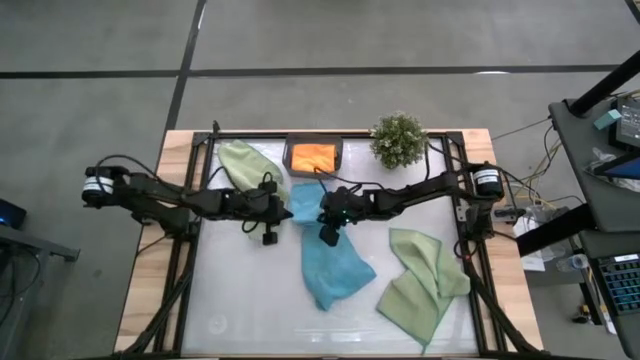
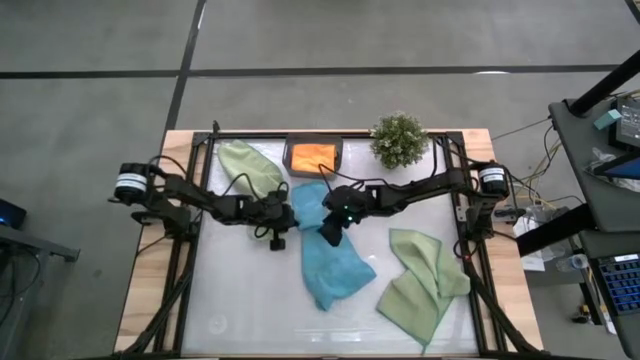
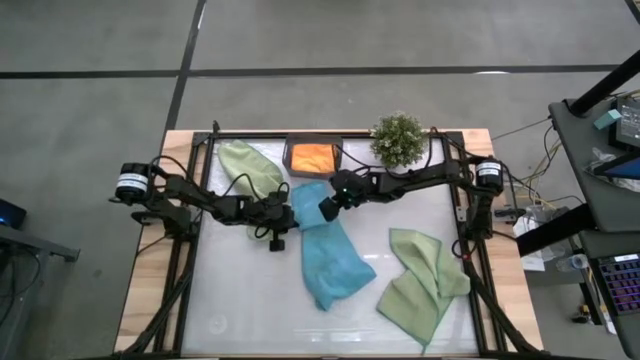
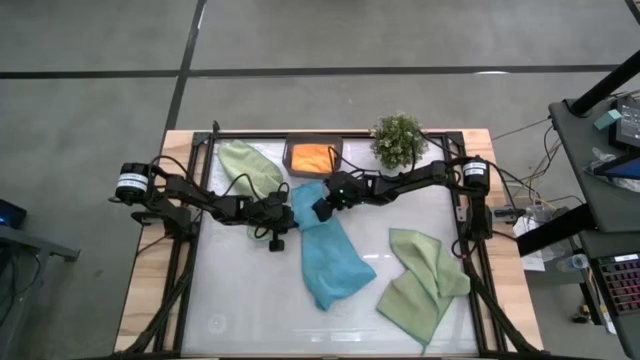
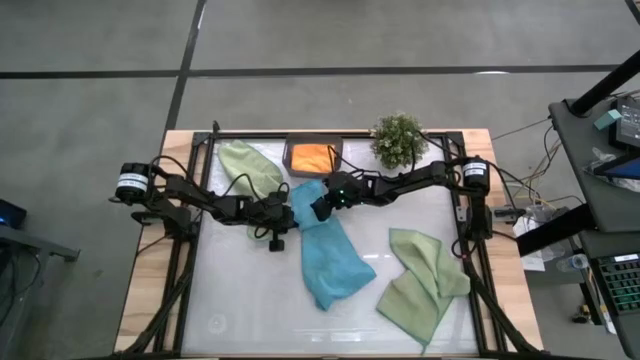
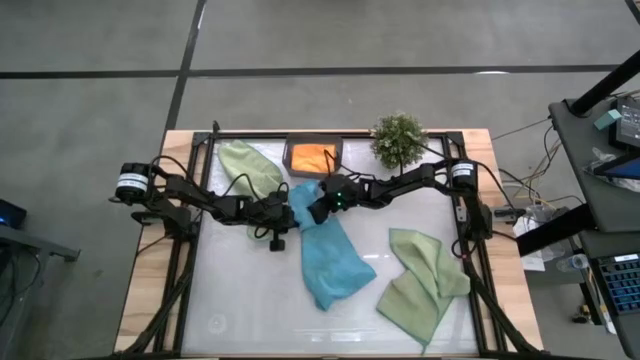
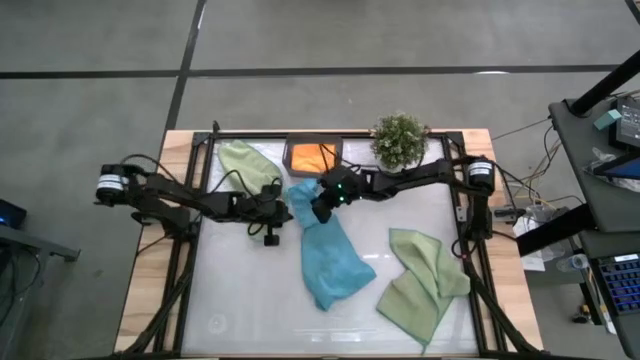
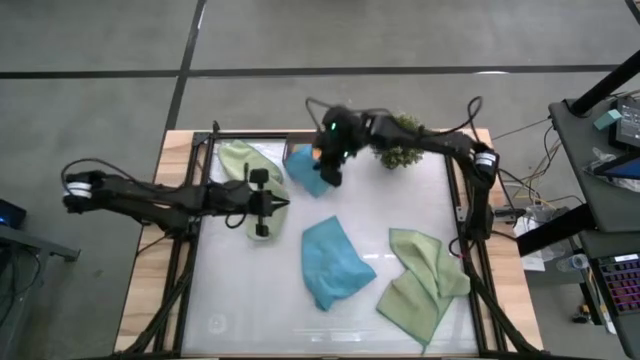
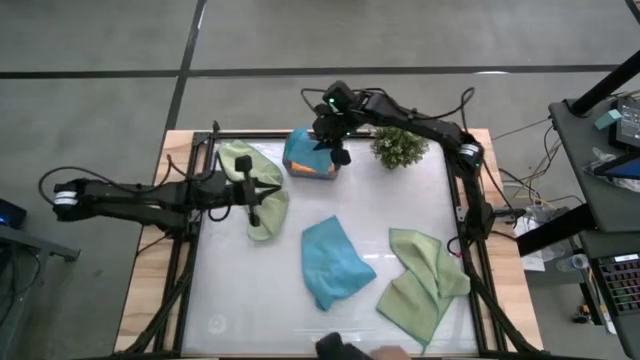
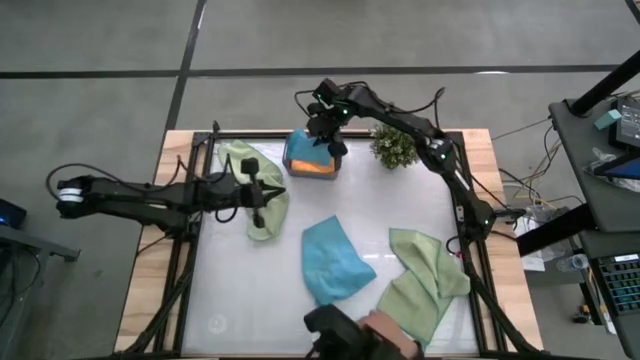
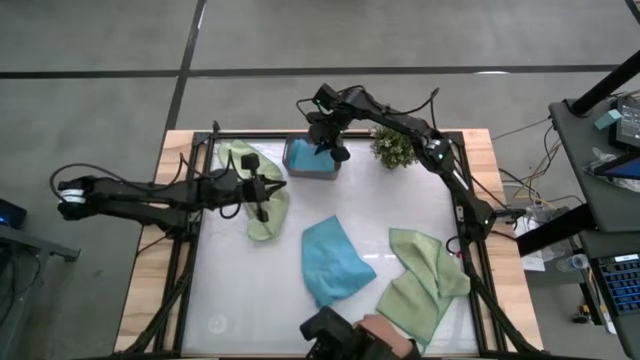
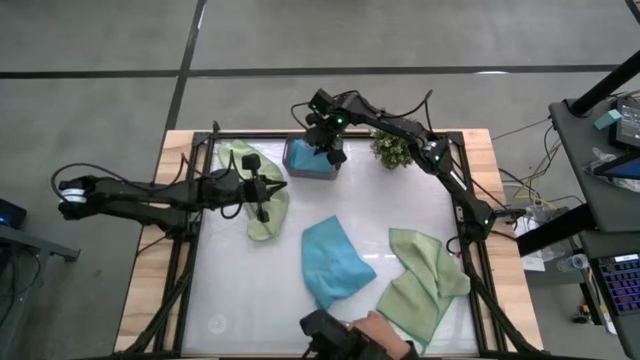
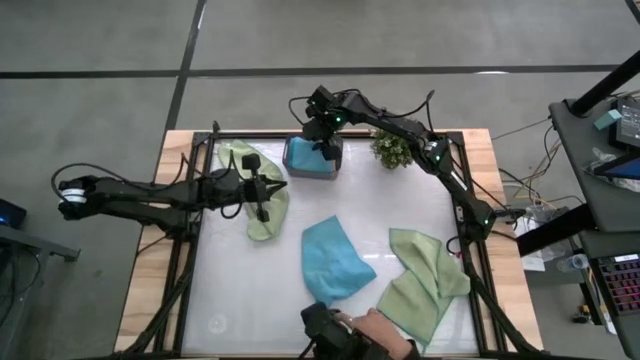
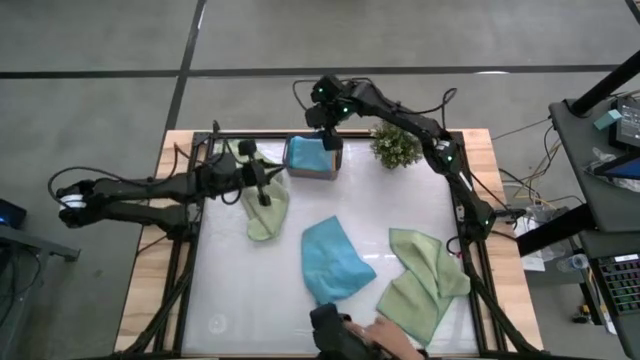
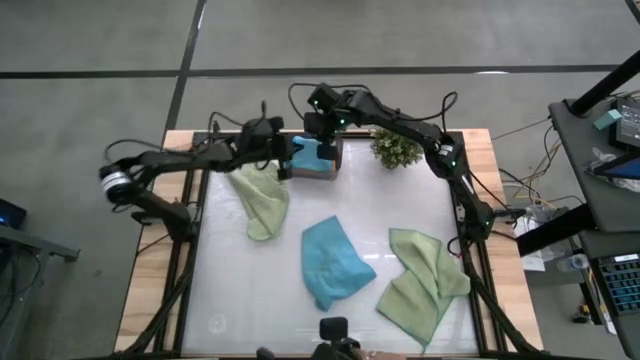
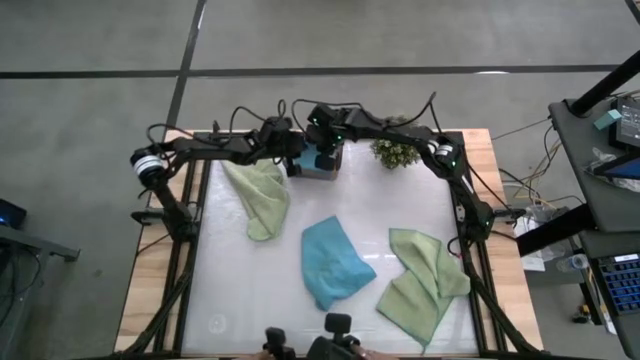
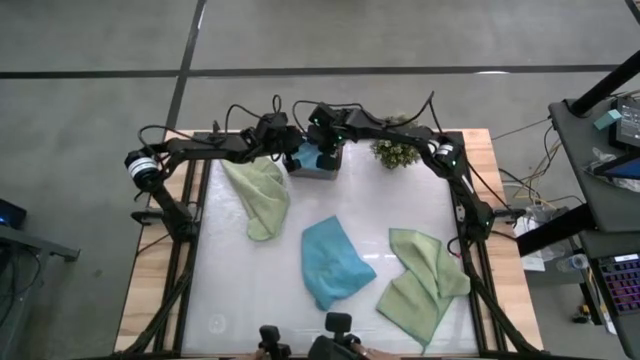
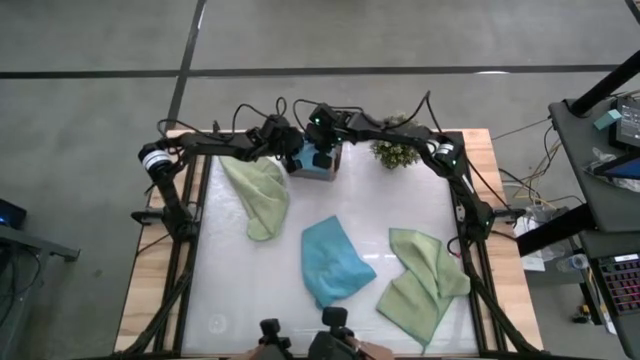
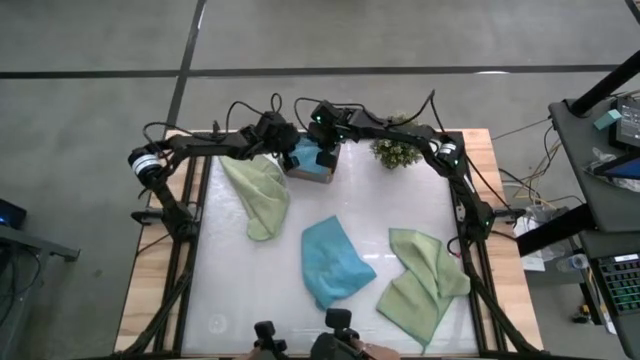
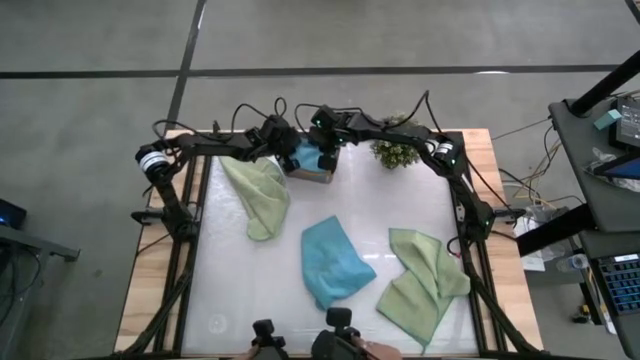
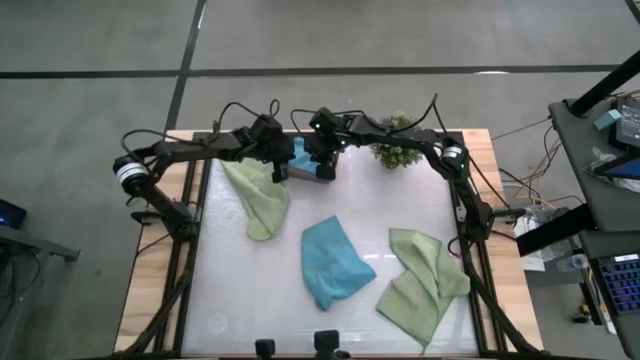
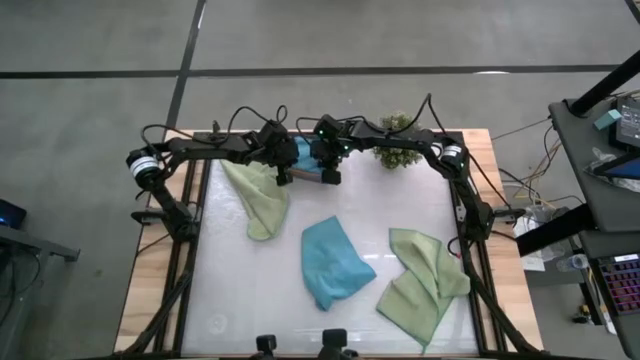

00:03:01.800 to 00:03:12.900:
Task: Fold microfiber towels
Put the folded blue microfiber towel into the black bin

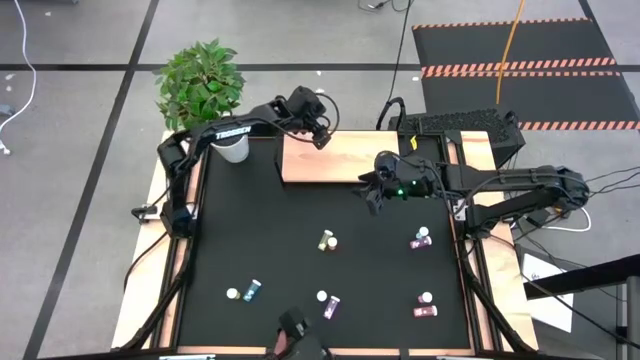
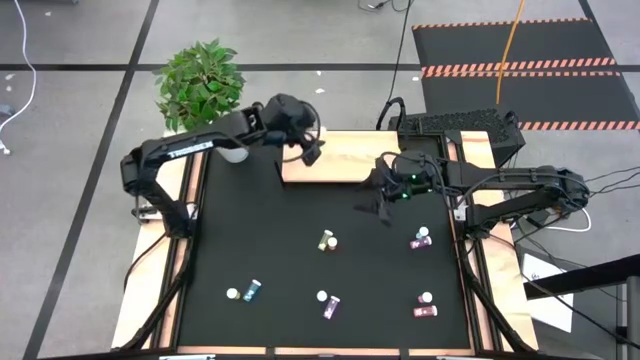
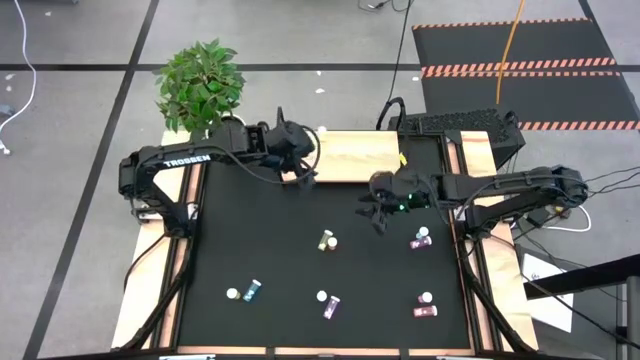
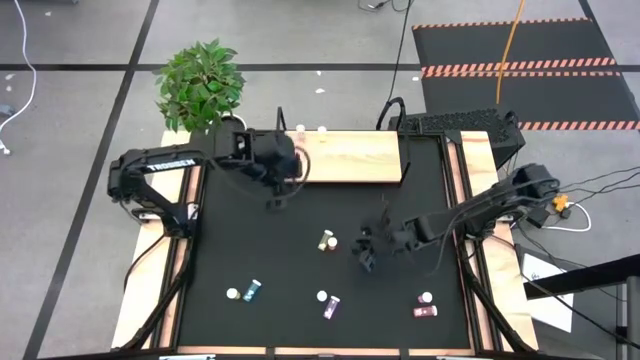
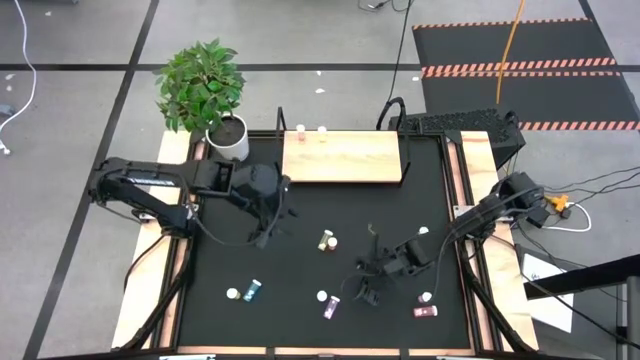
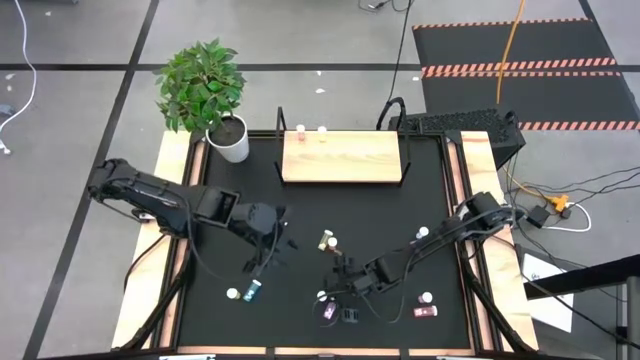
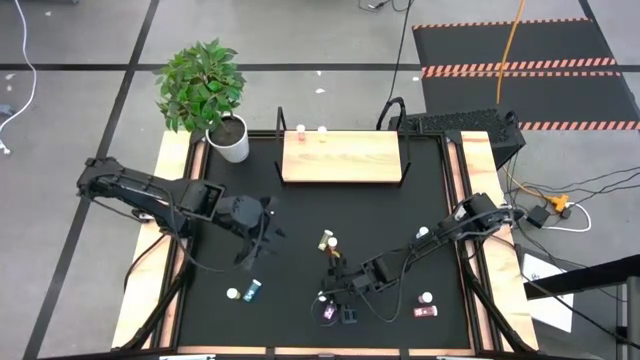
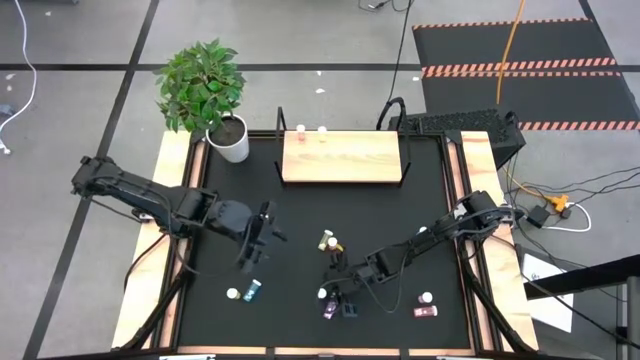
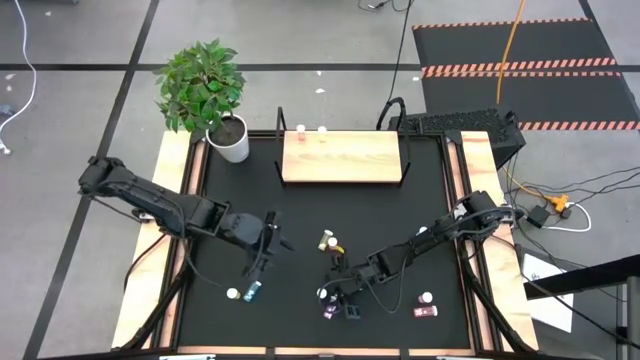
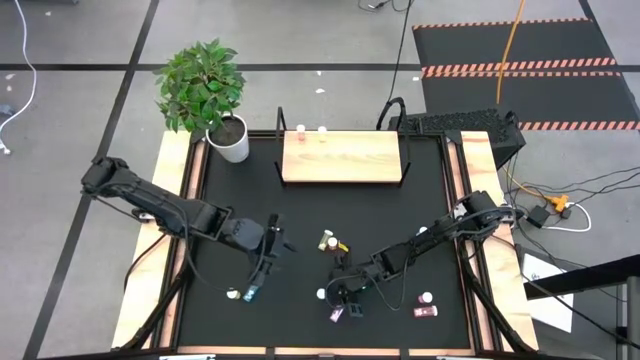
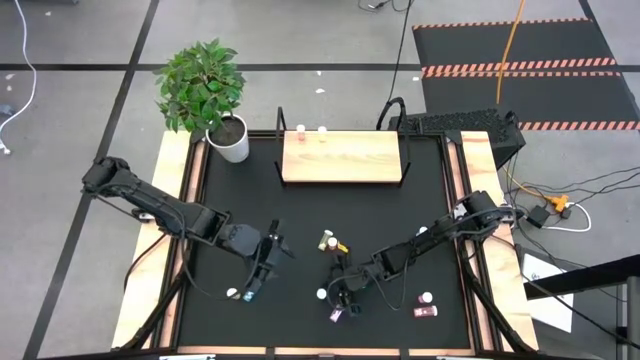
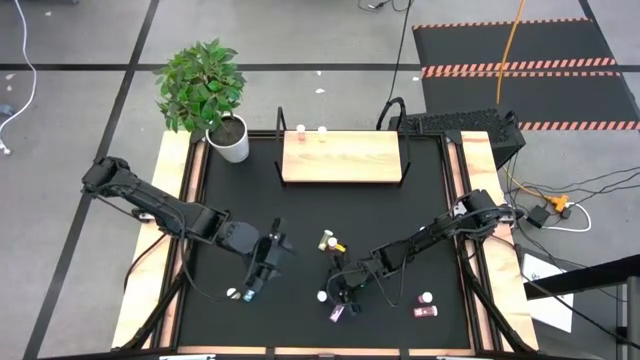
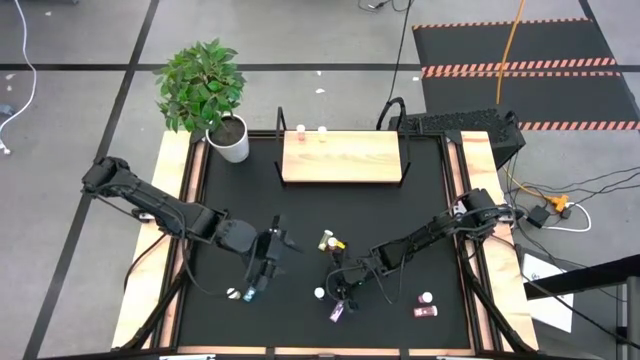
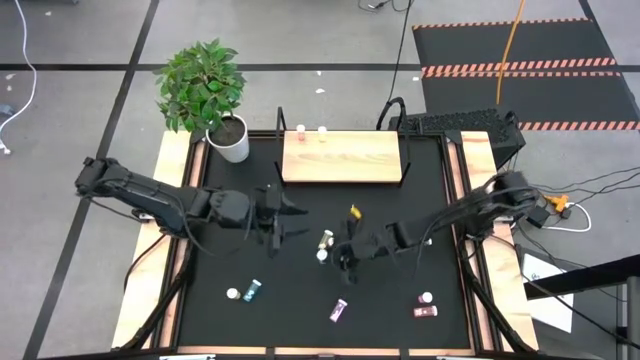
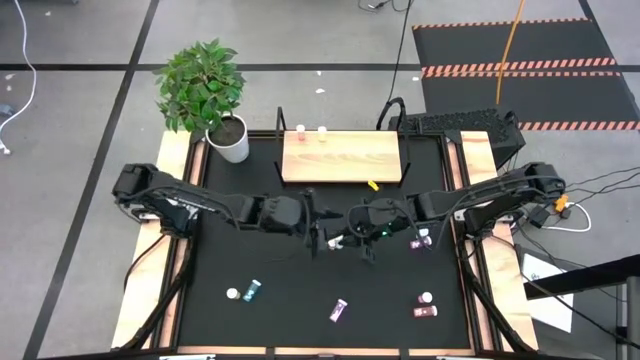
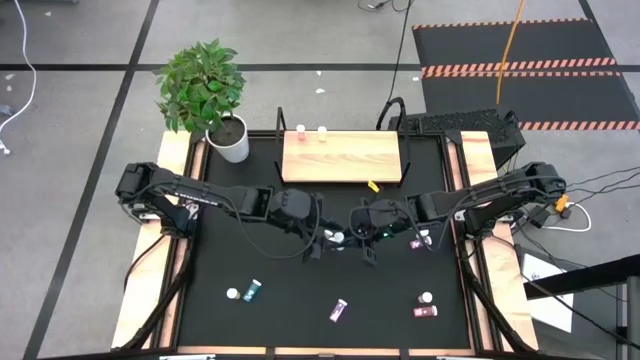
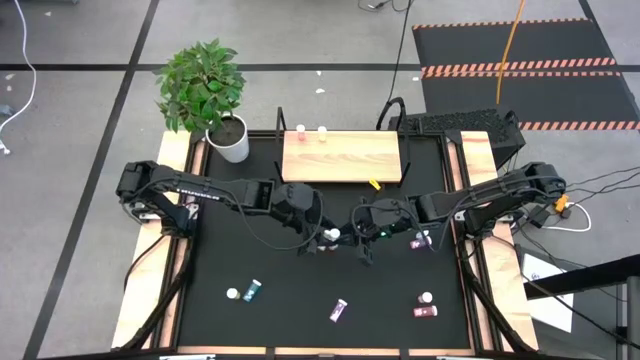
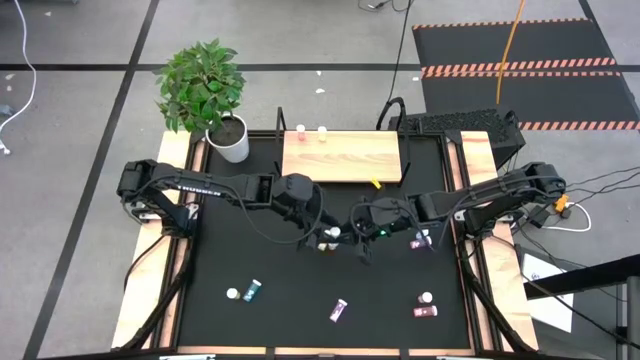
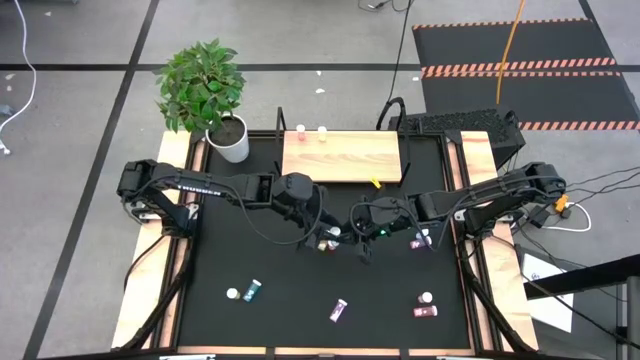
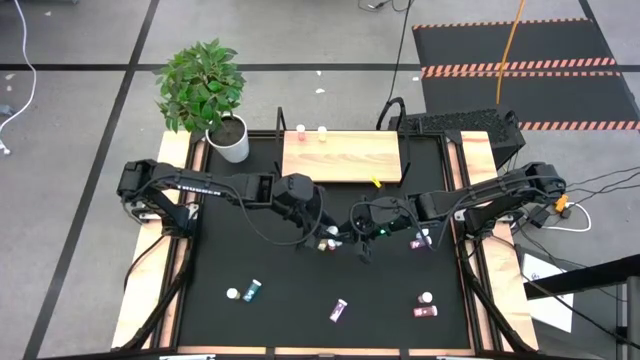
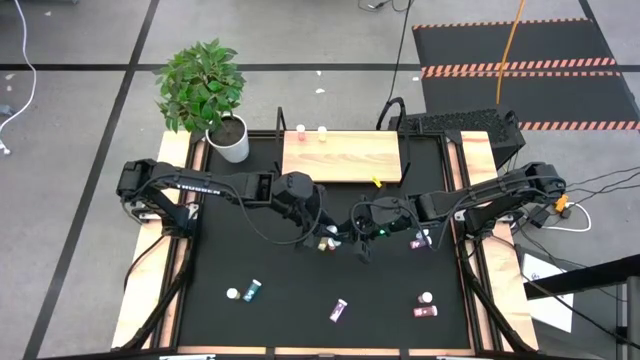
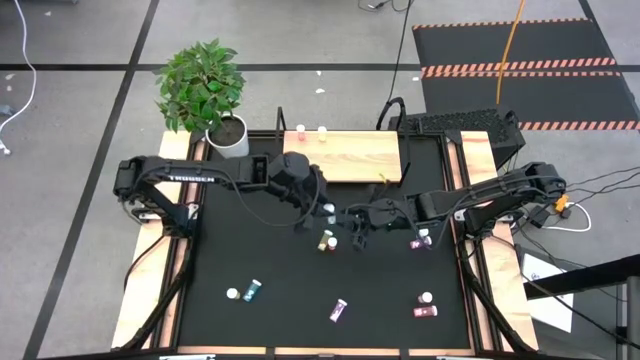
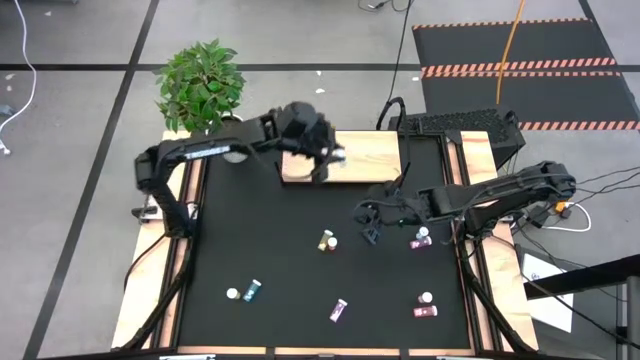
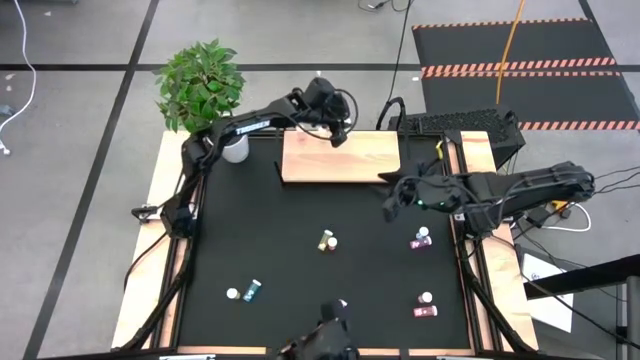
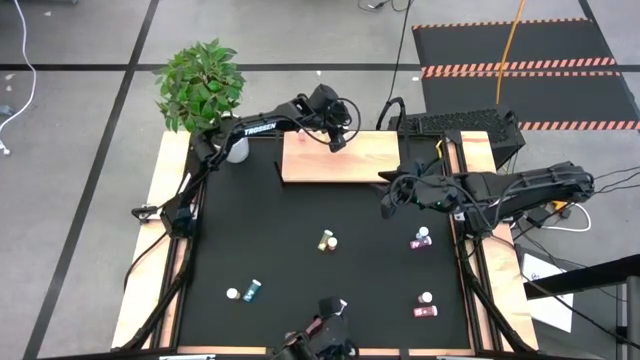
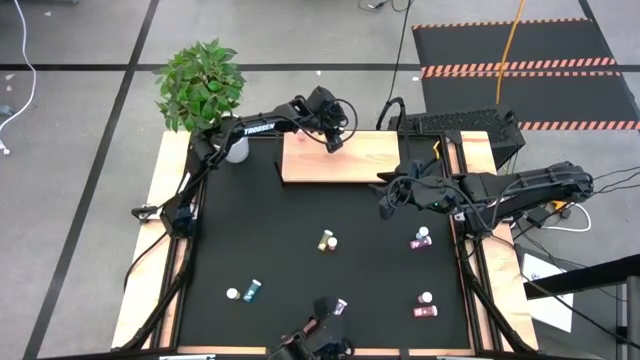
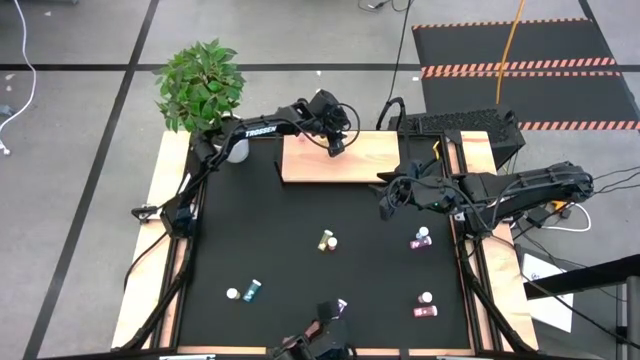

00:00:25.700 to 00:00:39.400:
Task: Pick and place medicine bottles onto shelf by color
Put the bottom right blue pill bottle on the shelf
